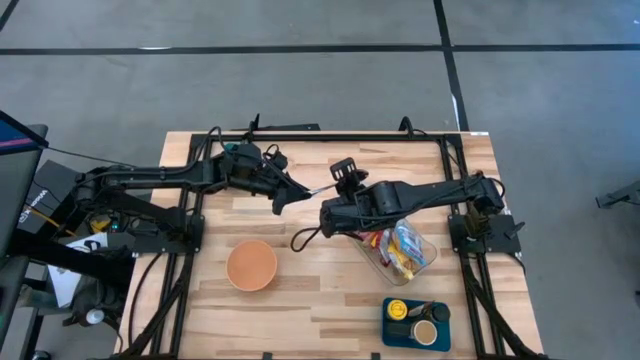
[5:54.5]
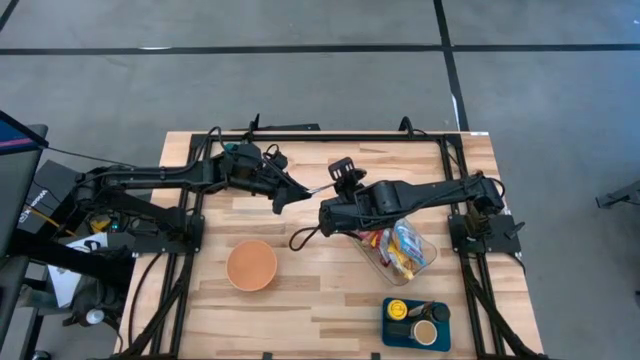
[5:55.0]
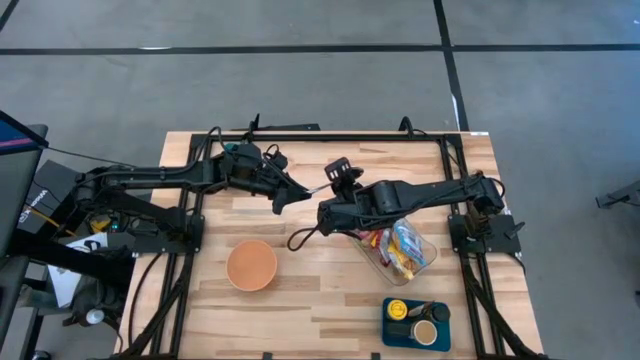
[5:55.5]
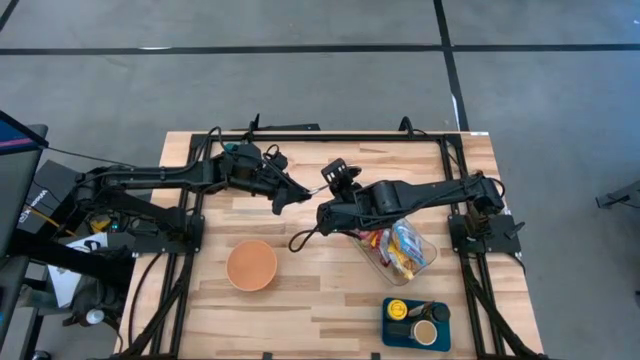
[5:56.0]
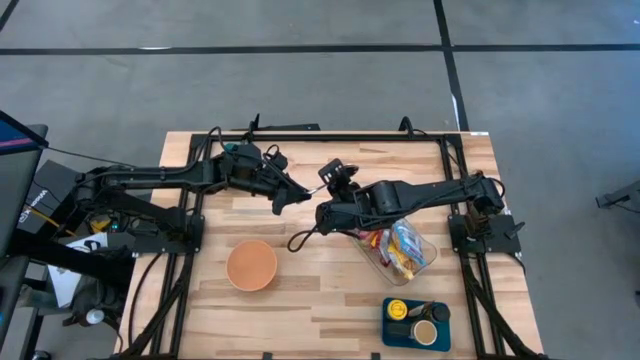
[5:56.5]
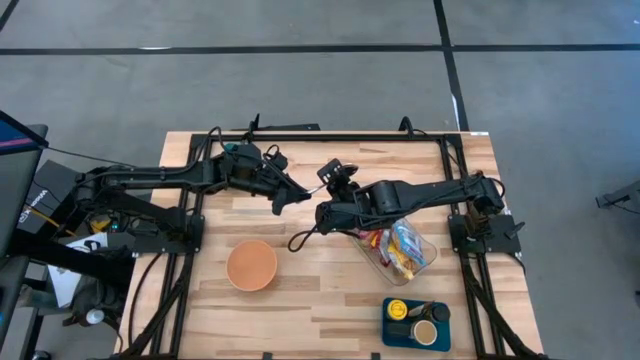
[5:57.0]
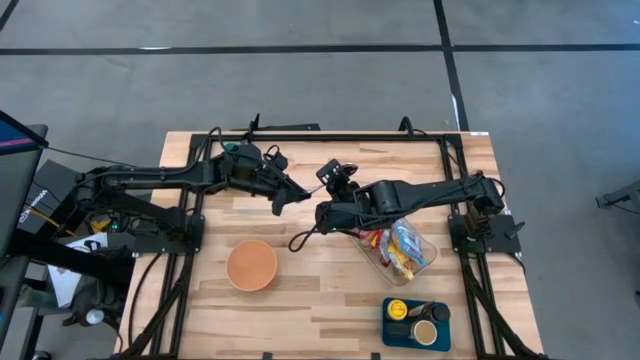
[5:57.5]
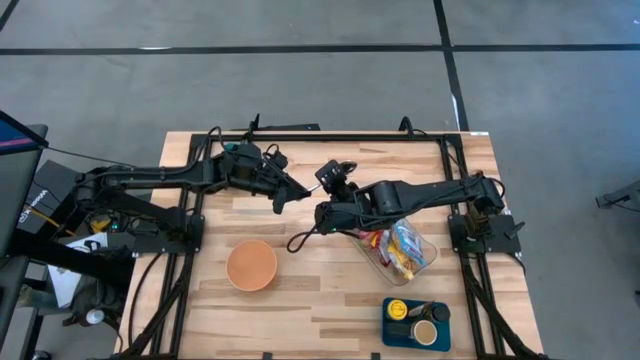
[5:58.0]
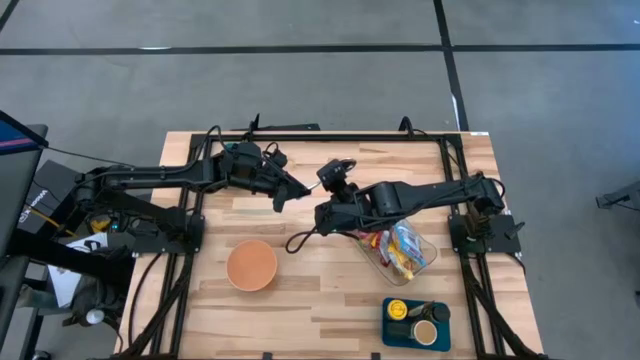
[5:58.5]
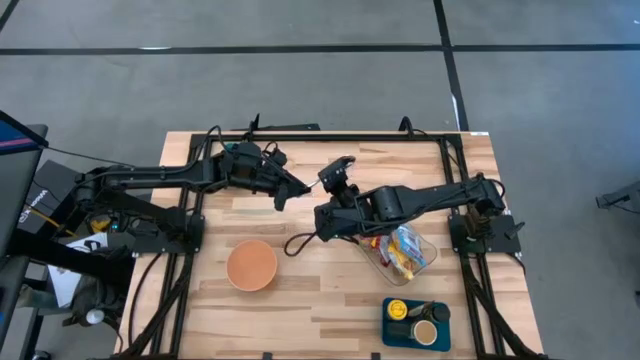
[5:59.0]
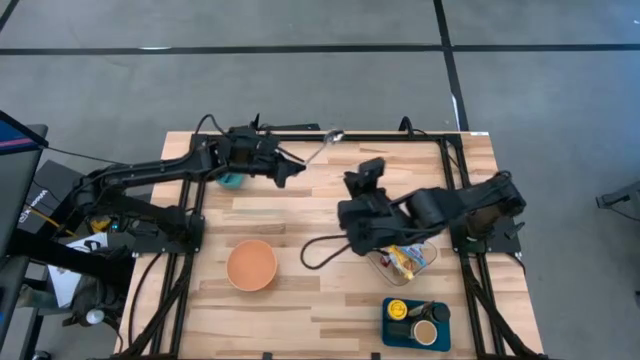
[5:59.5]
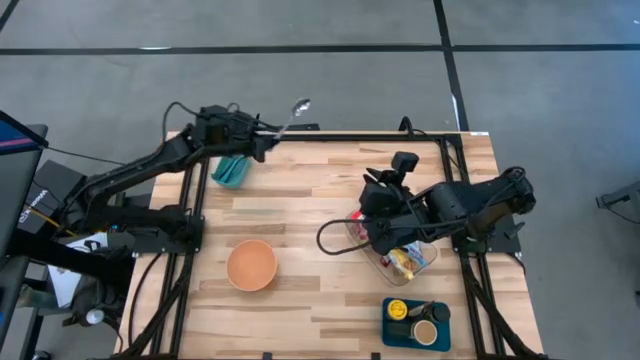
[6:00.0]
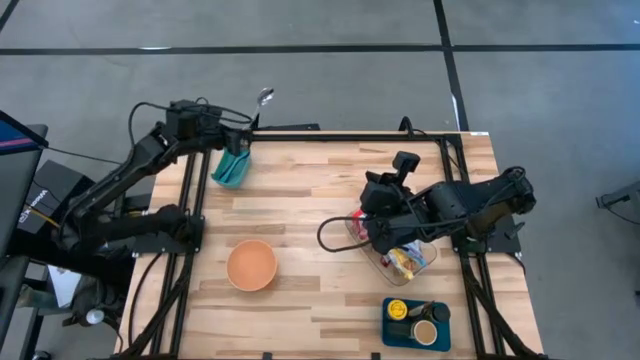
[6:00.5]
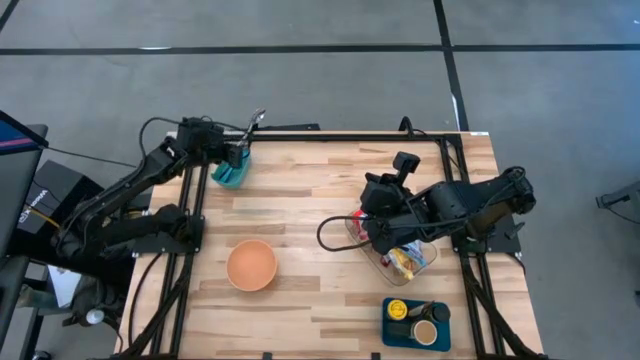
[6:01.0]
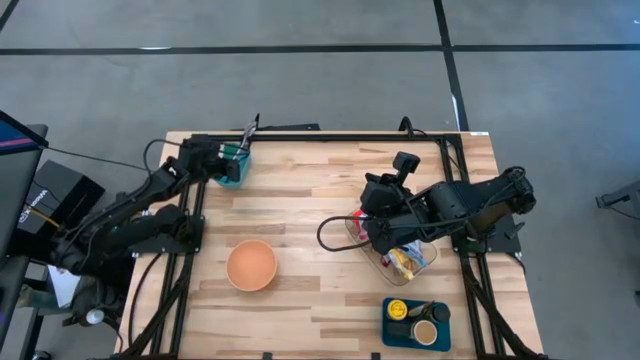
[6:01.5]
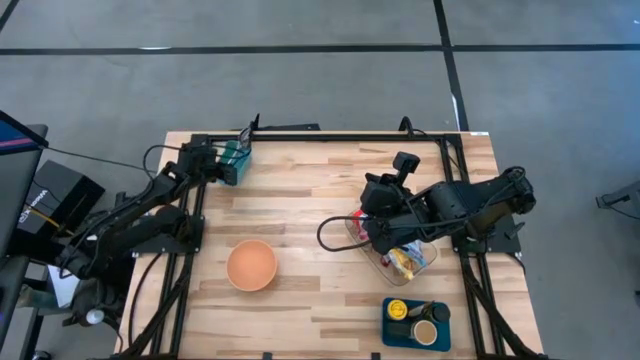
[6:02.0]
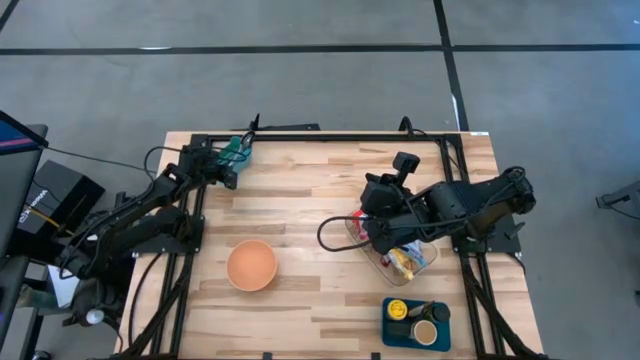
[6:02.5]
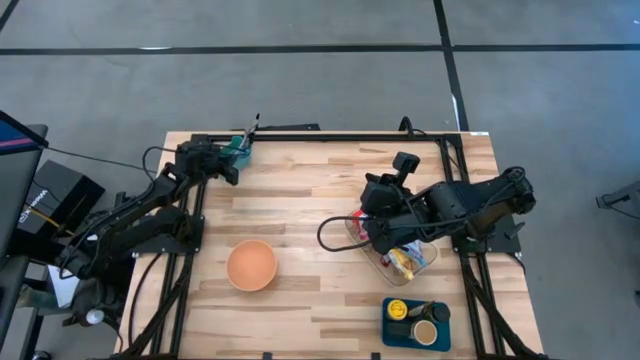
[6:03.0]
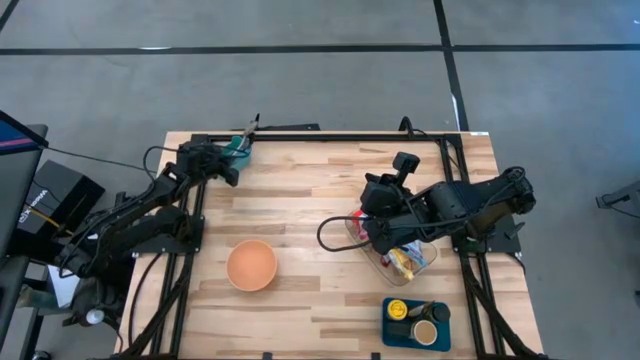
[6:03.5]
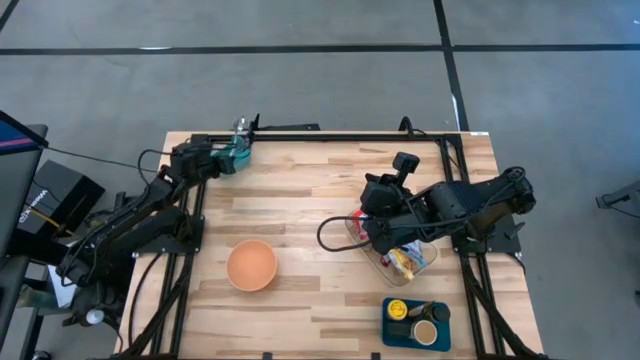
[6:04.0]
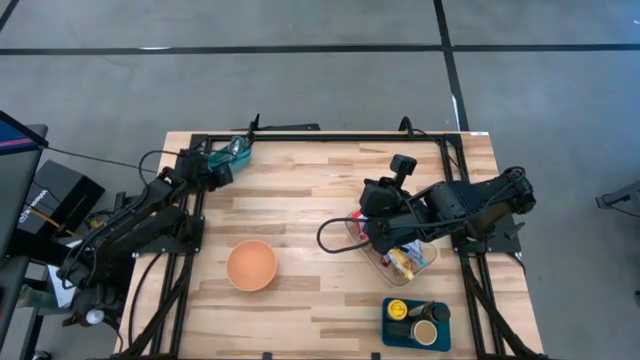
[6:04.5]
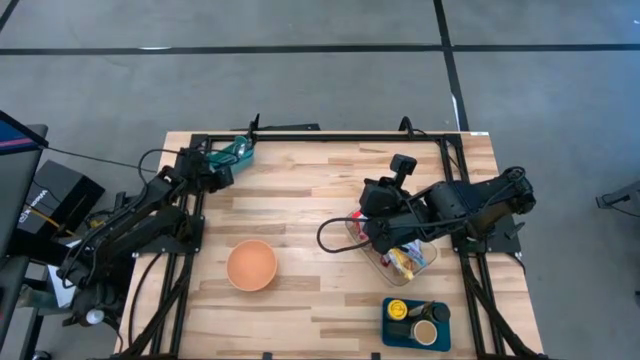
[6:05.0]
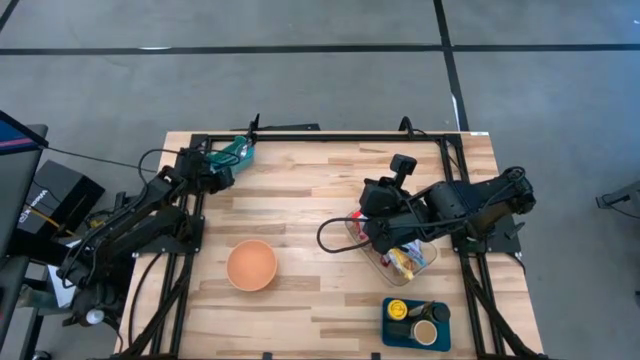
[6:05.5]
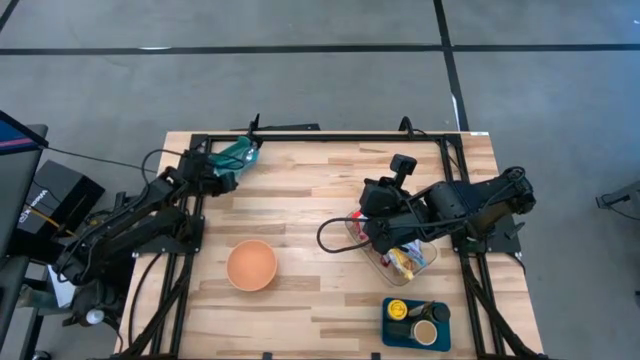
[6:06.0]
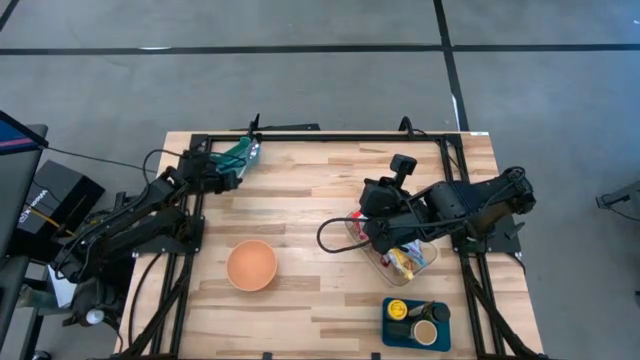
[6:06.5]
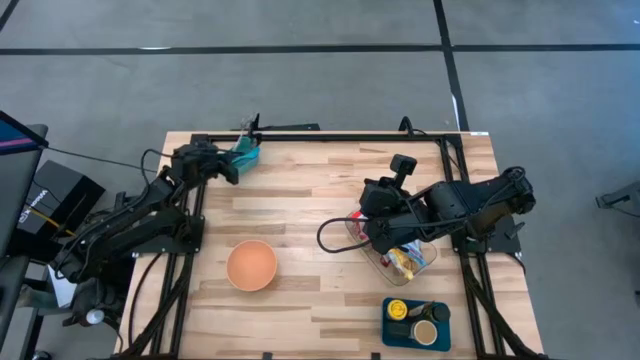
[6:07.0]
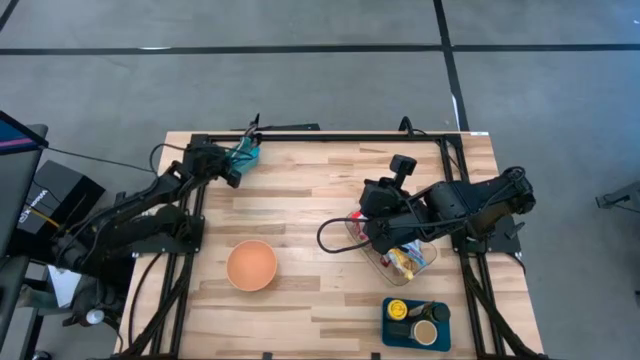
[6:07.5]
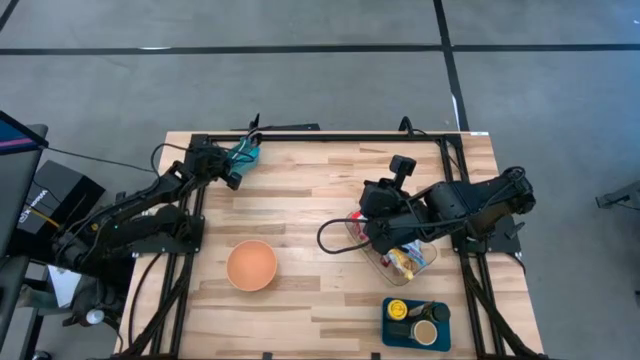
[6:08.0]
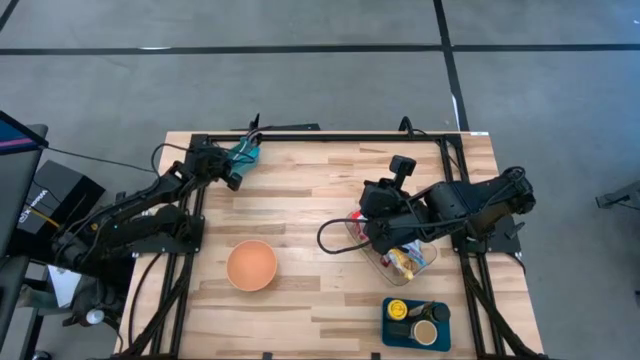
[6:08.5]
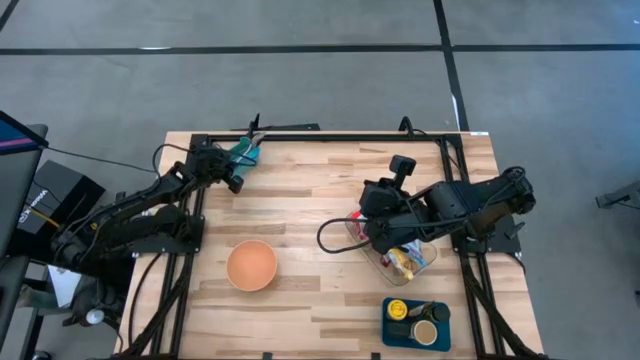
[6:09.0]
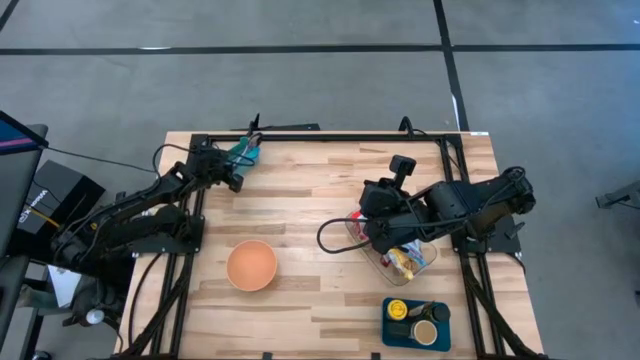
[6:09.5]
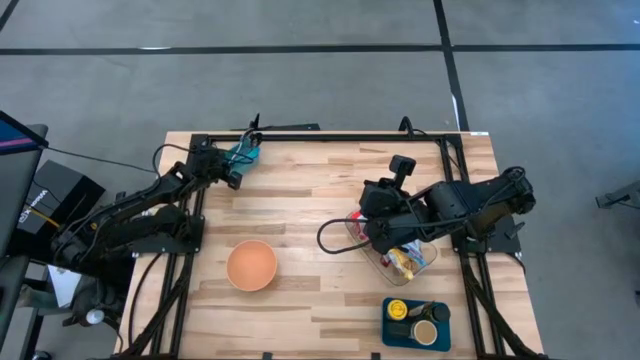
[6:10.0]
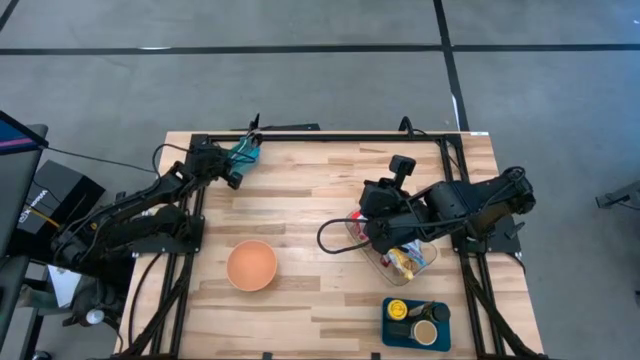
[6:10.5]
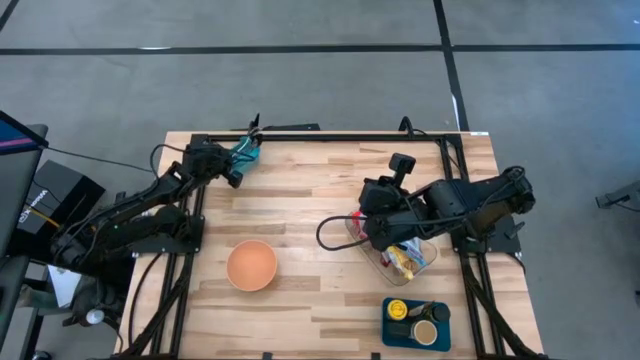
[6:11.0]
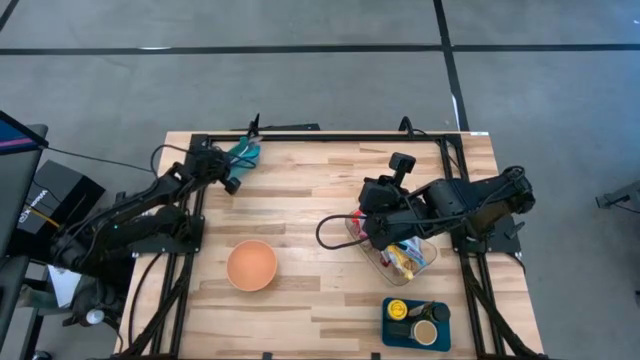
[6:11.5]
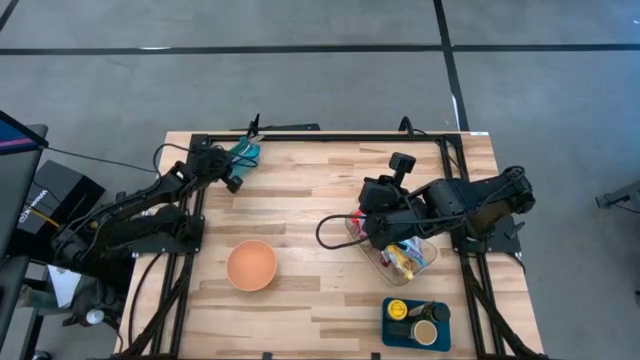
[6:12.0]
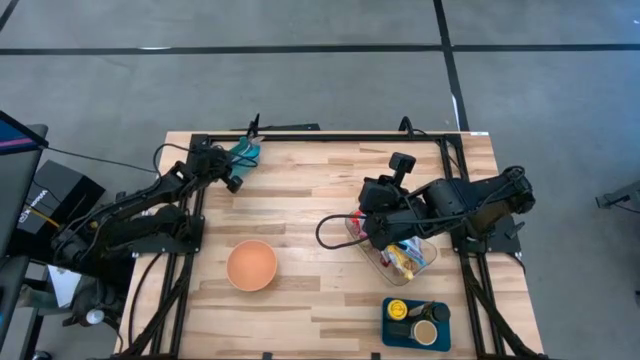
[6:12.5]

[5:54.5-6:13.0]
Task: Pick & Place Food Item
Put the silver spoon into the green bin

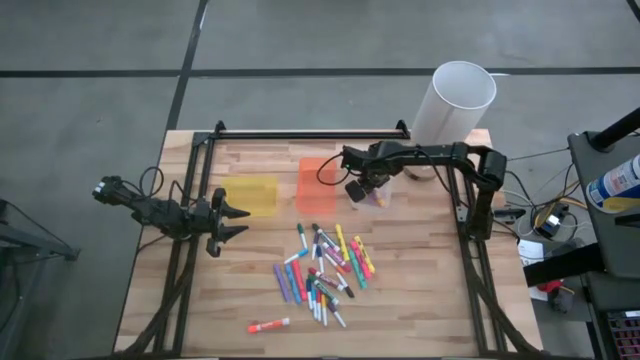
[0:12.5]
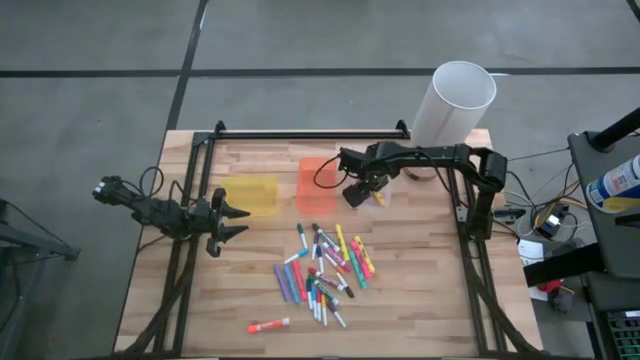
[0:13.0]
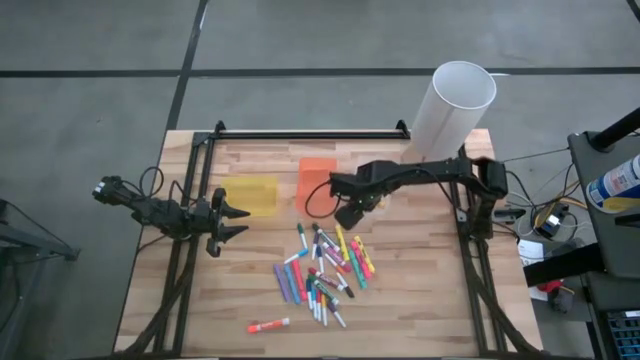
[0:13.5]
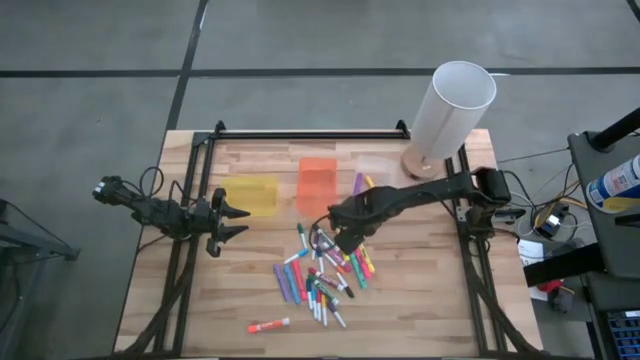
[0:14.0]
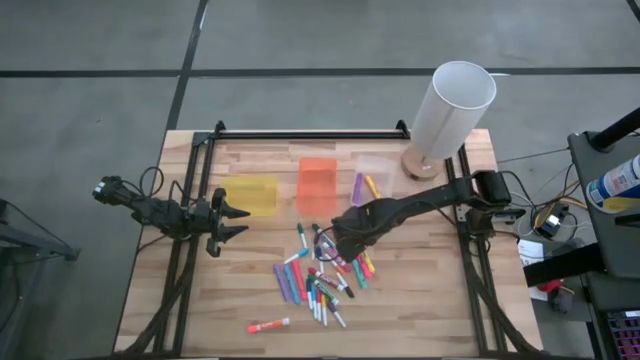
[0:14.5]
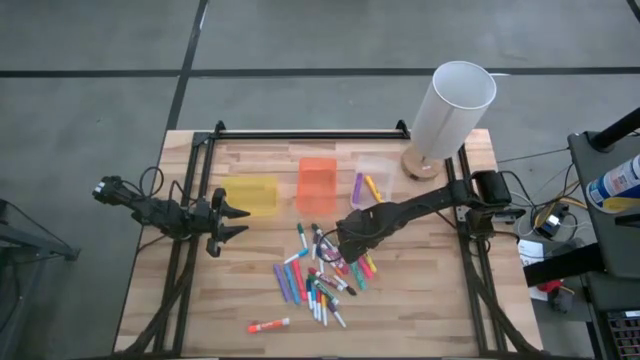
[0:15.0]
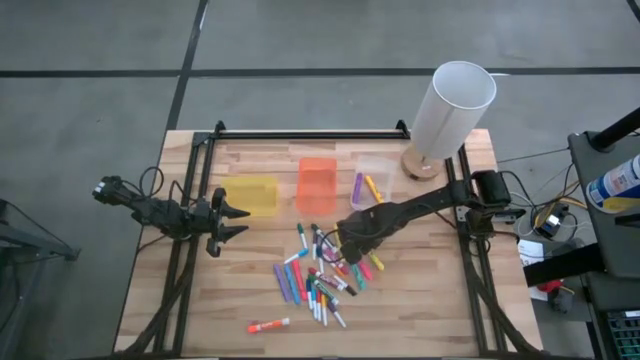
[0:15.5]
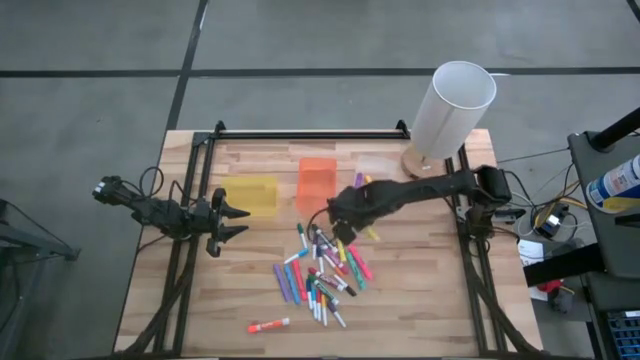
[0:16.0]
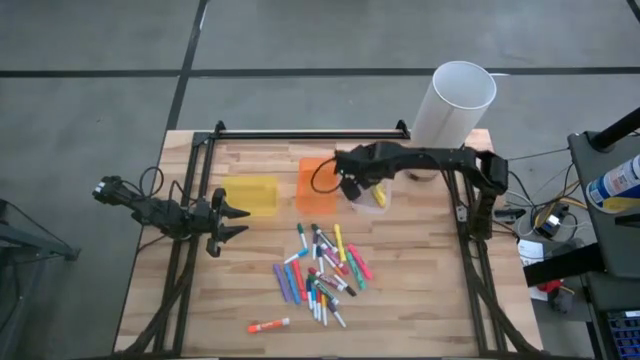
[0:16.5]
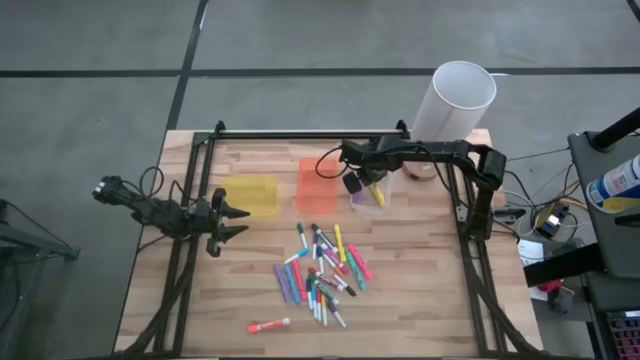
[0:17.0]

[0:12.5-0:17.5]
Task: Pick & Place Markers
Put the light yellow highlighter into the transparent bin
